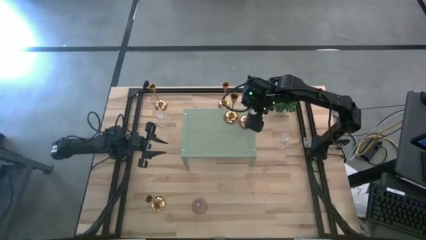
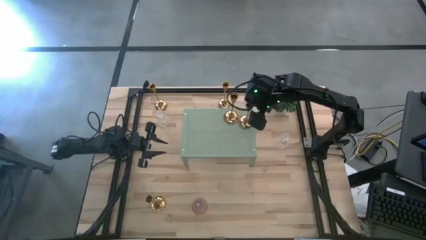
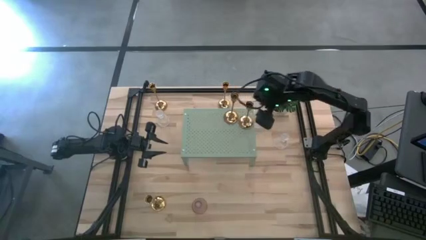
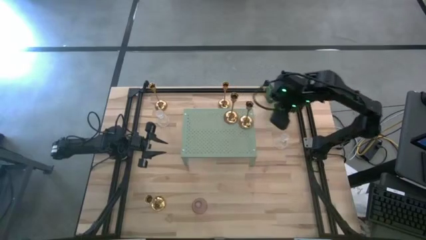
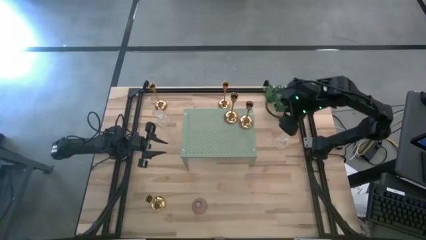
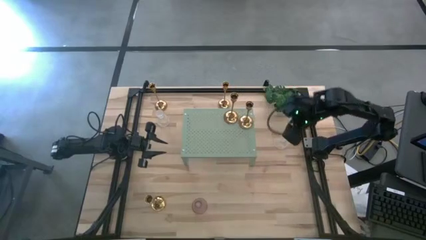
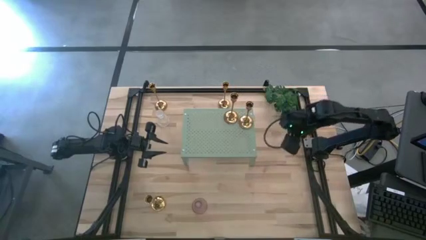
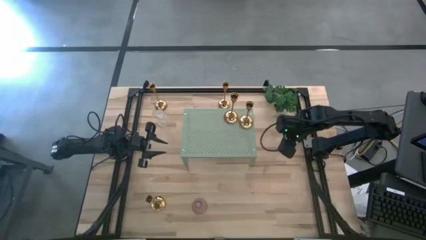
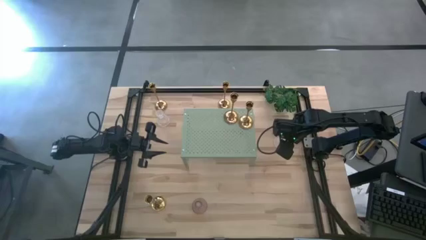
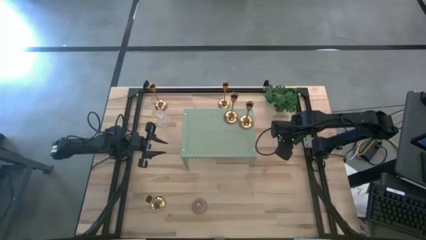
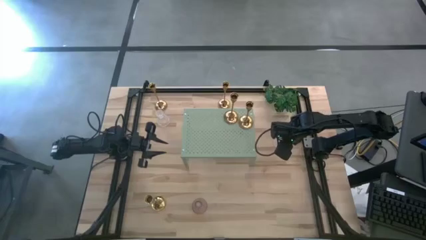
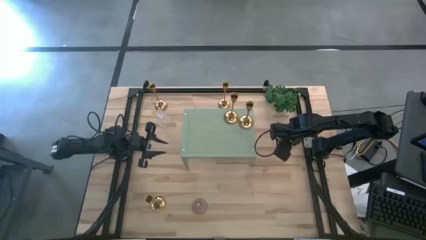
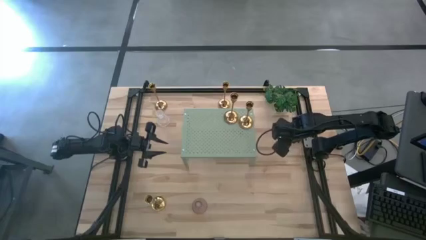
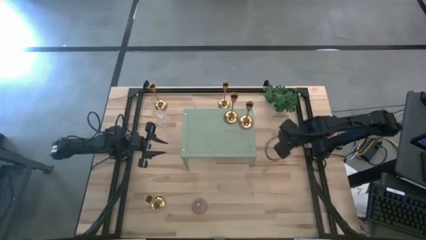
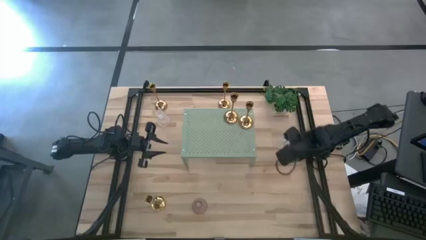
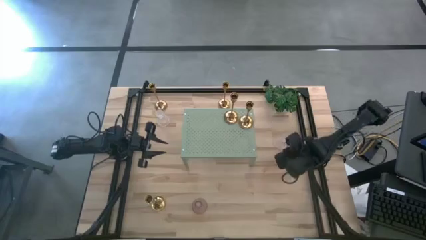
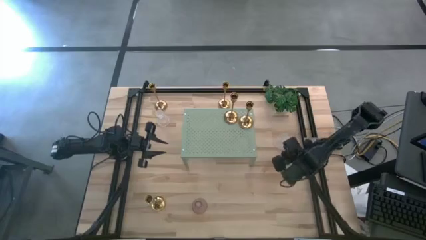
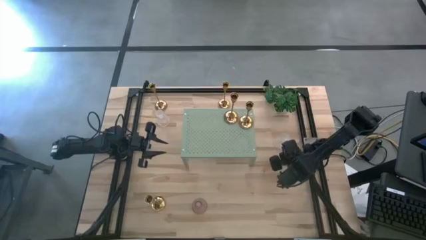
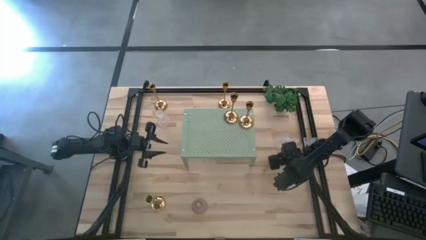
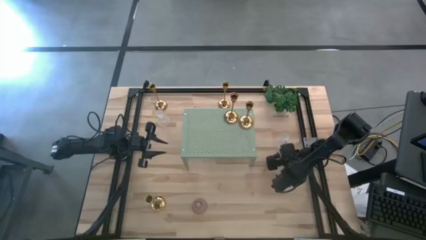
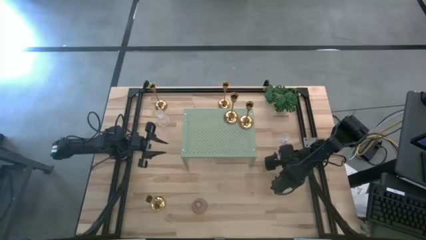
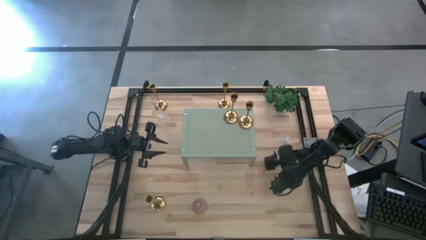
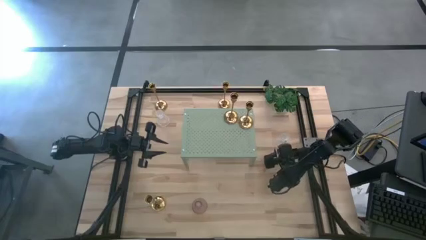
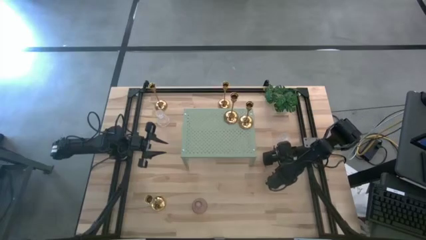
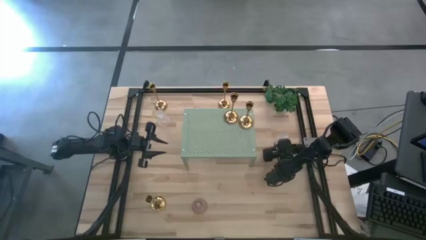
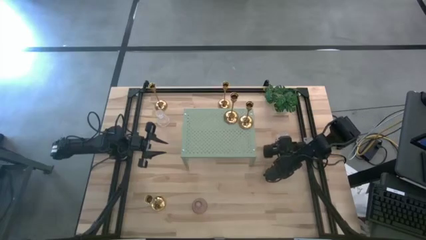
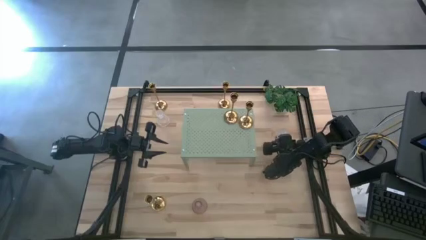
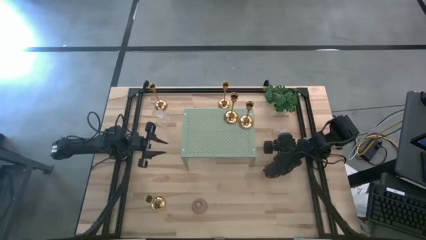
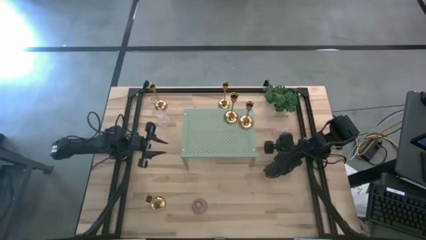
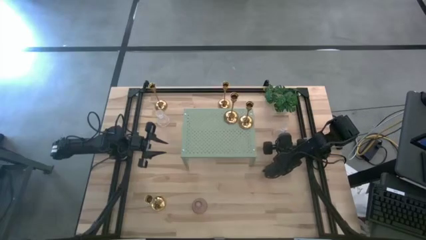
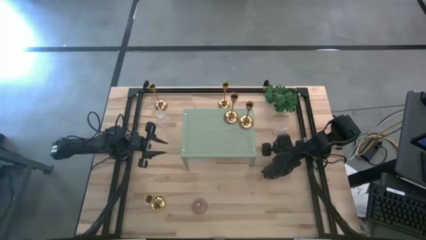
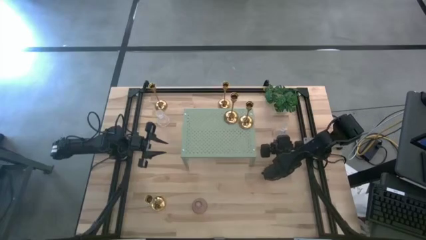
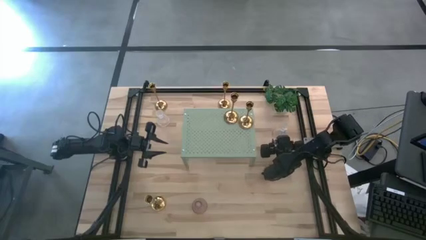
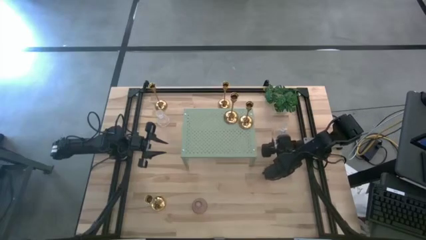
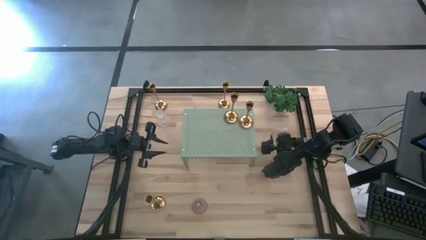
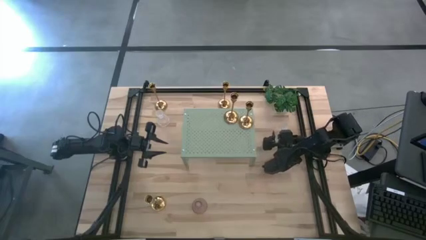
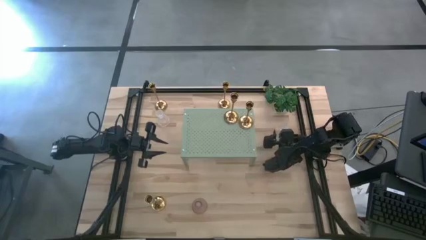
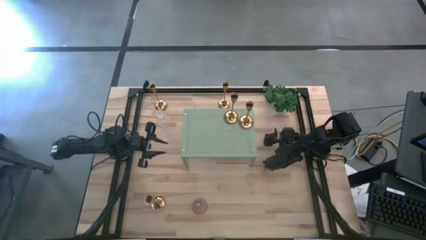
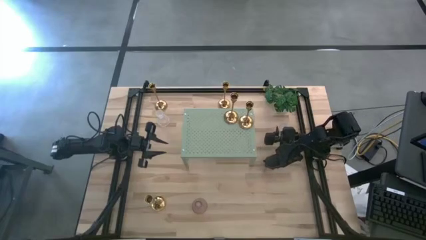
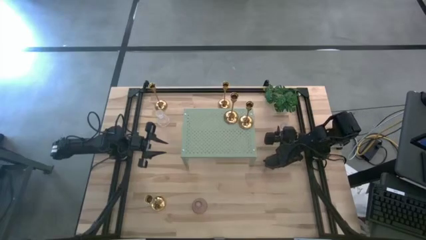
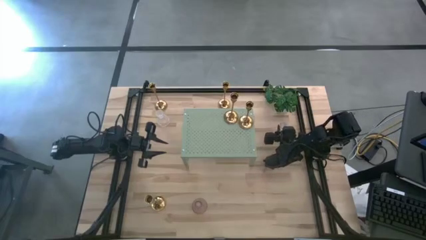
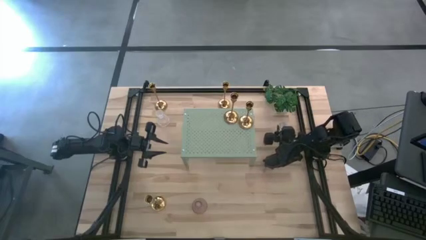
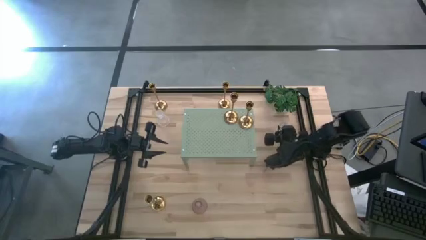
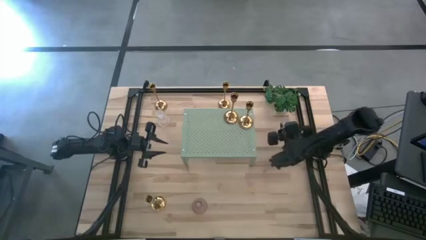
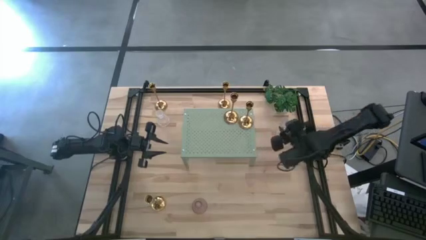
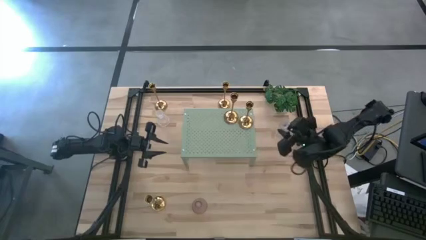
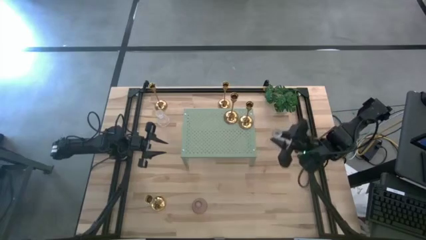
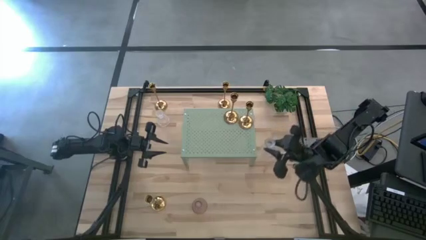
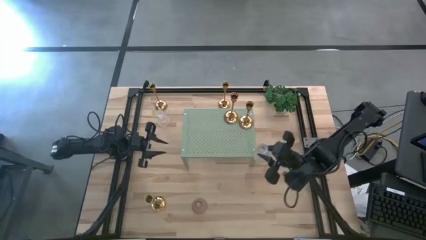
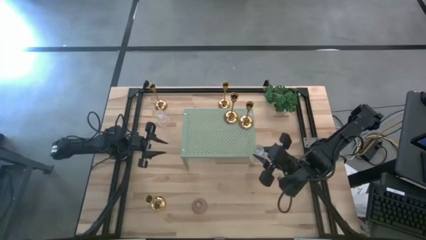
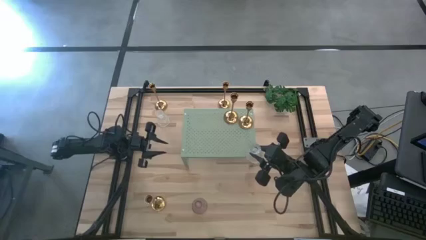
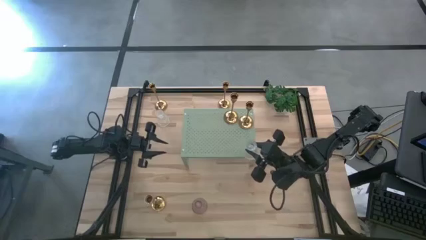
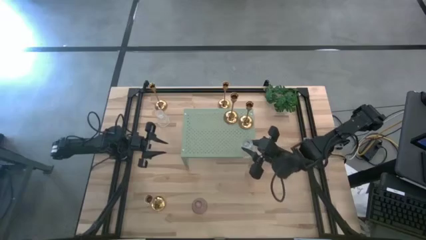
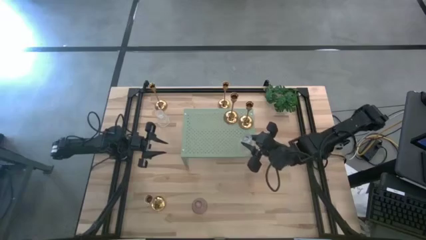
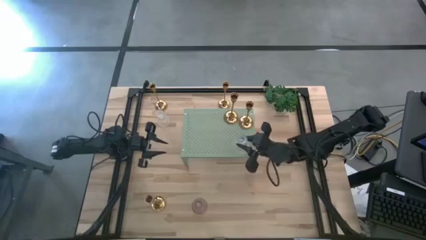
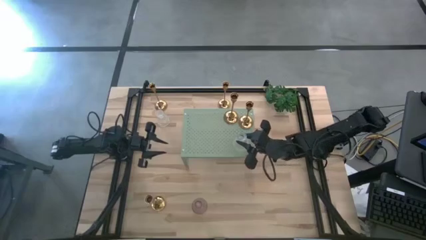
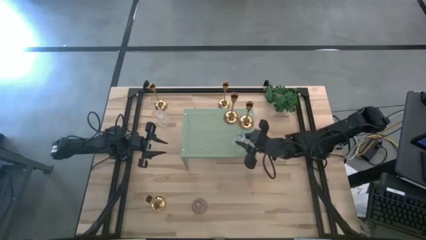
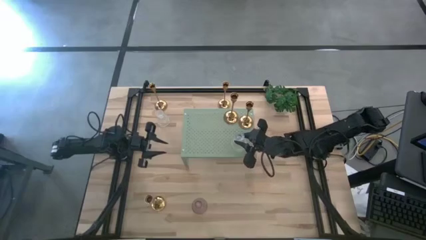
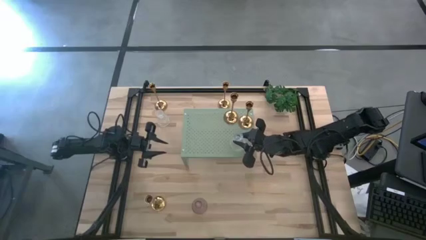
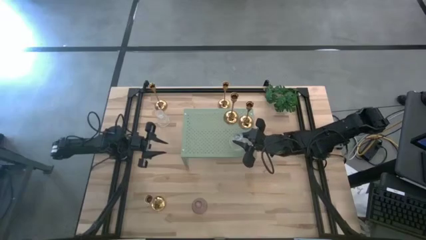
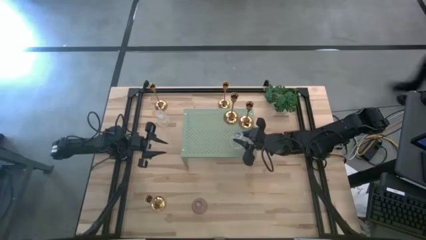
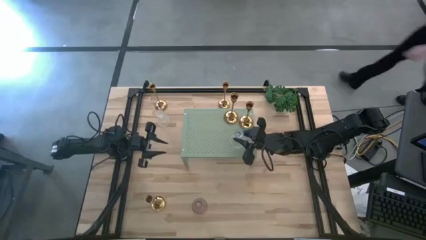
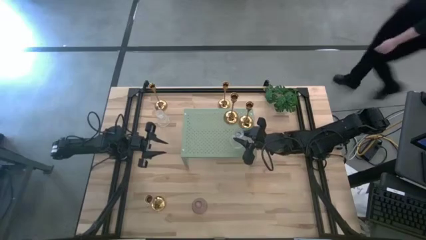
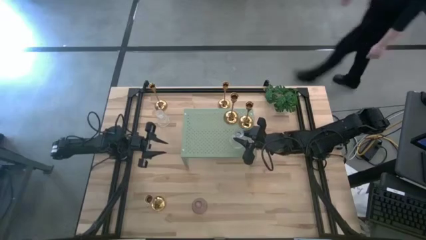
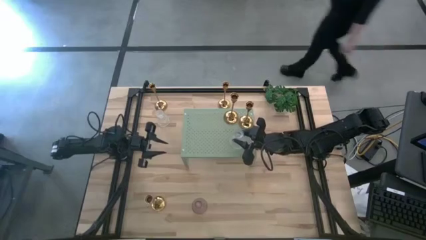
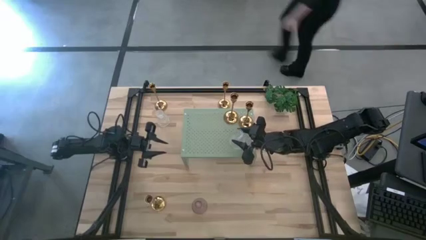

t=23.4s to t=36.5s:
Task: Pick & Place candle stick holders
Put the right white crystal glass candle holder on the shelf
